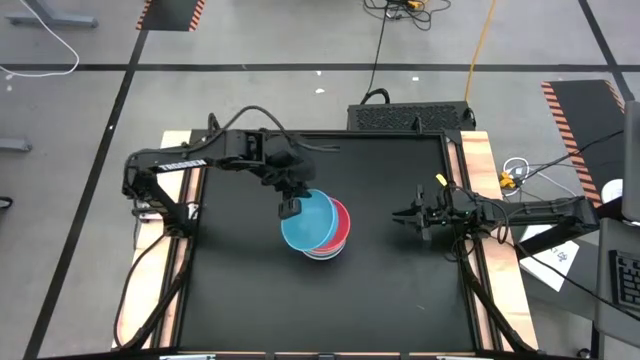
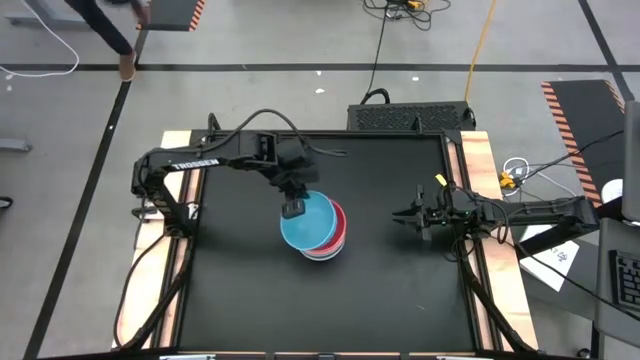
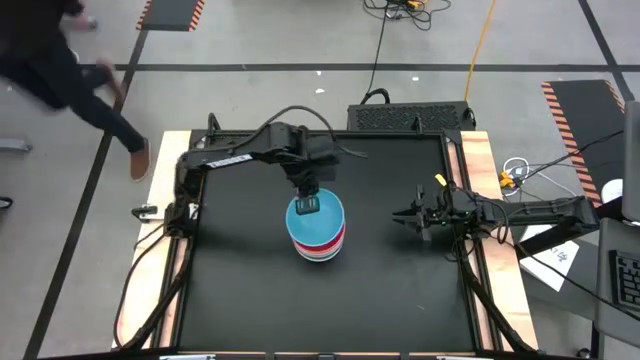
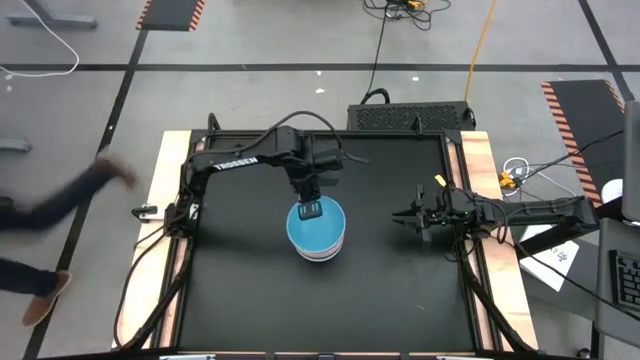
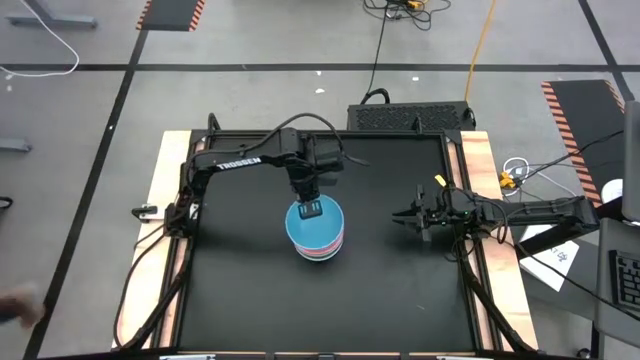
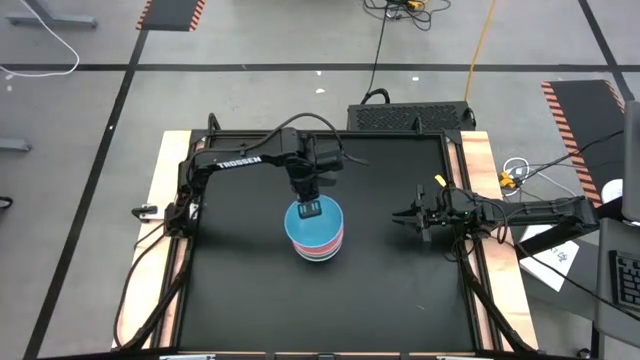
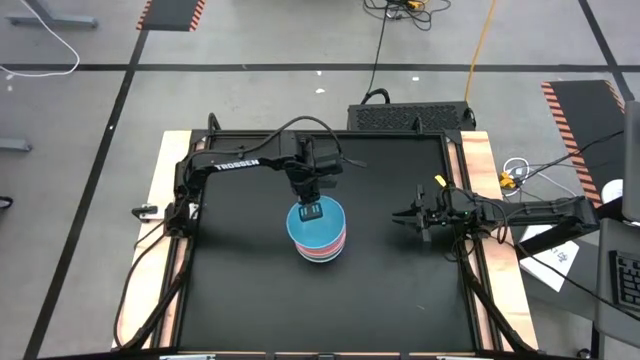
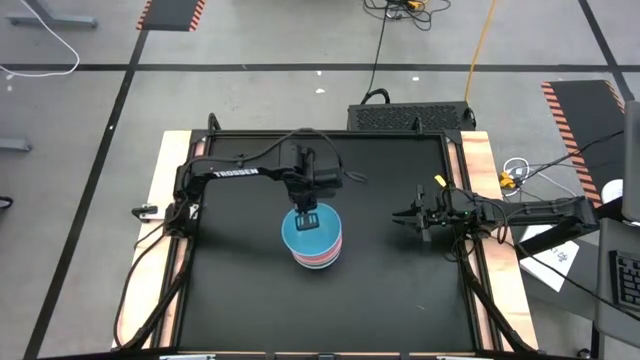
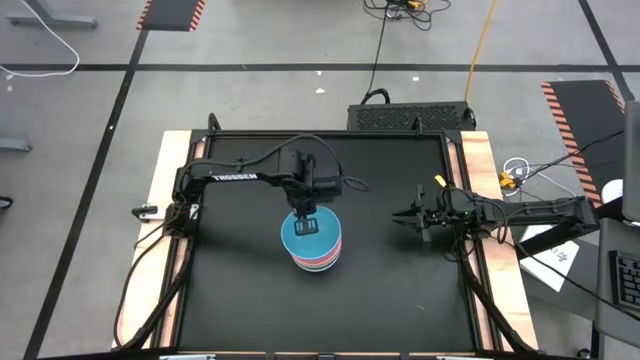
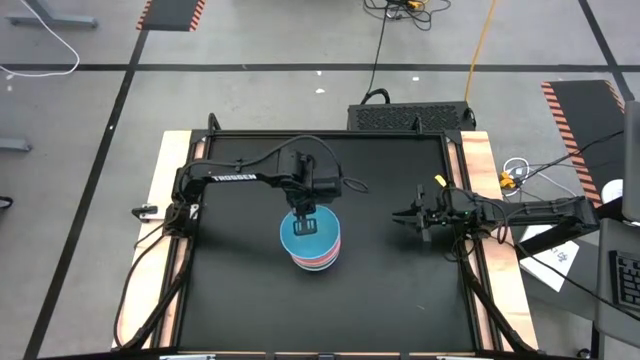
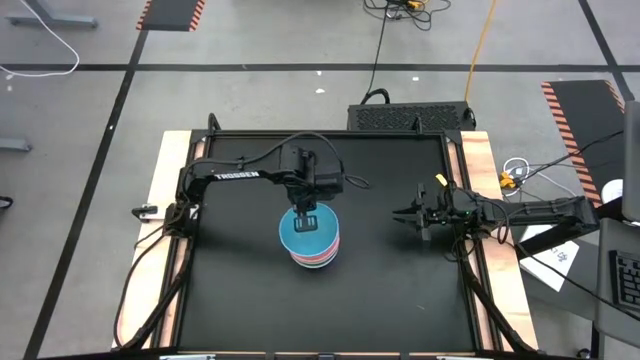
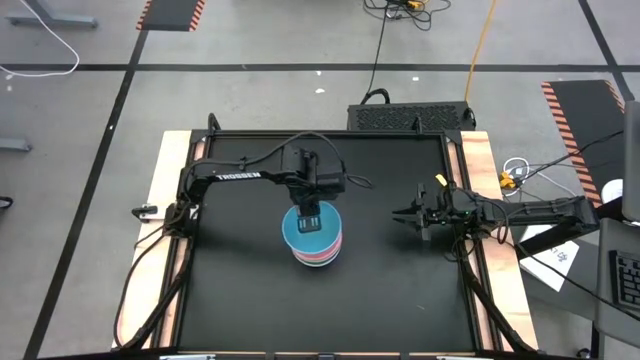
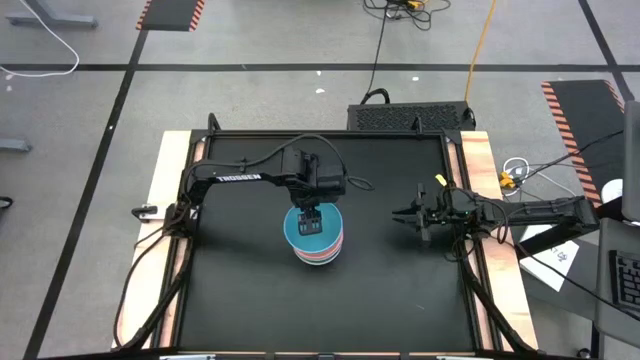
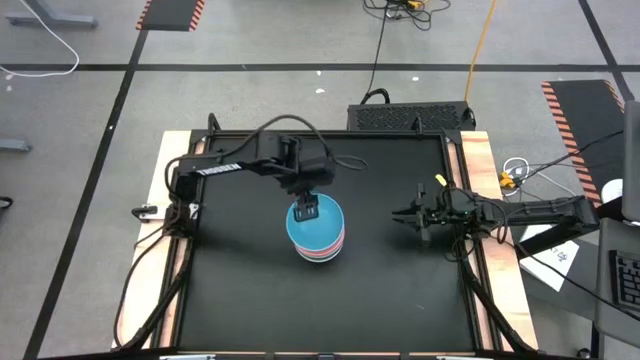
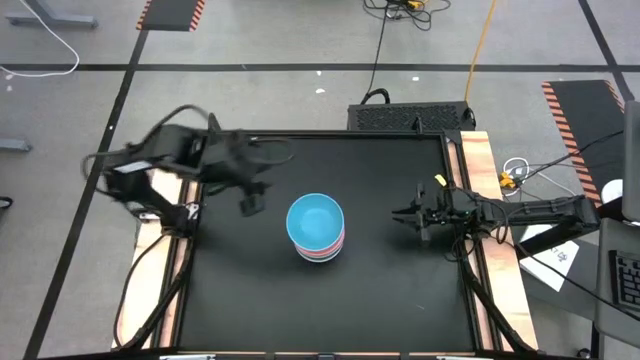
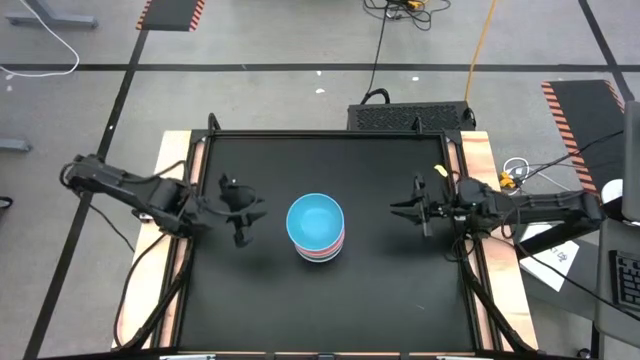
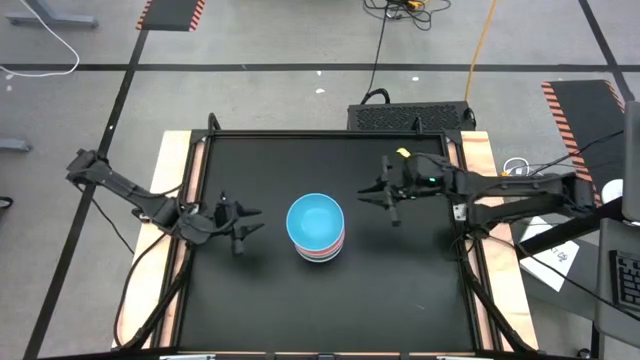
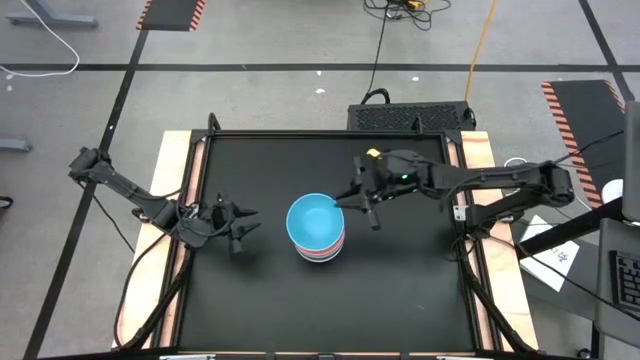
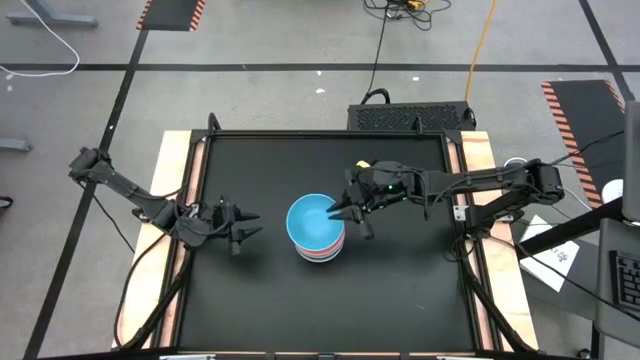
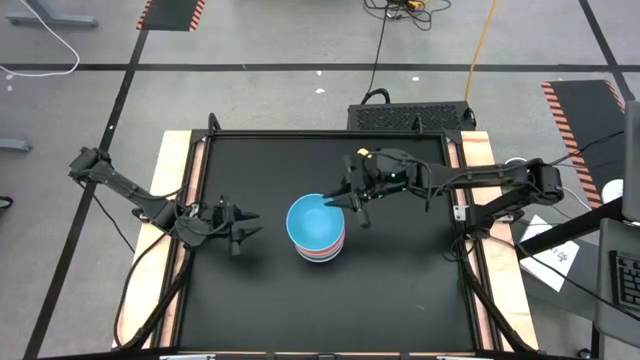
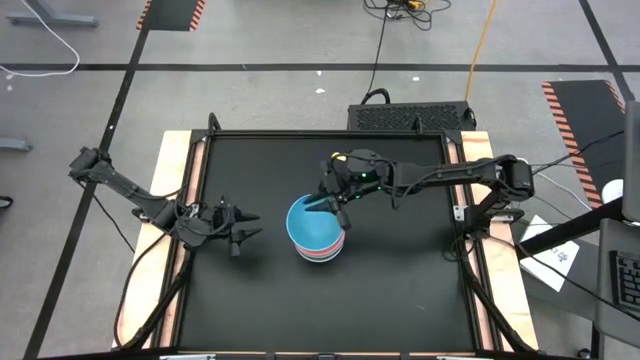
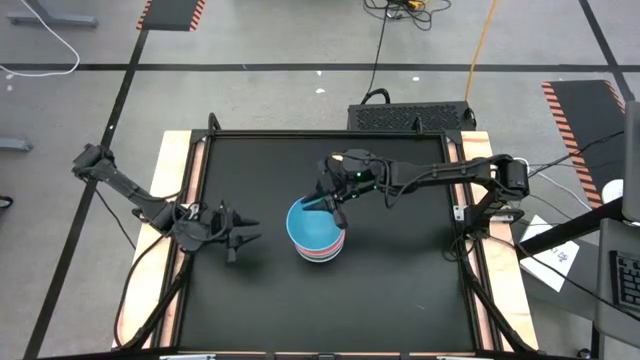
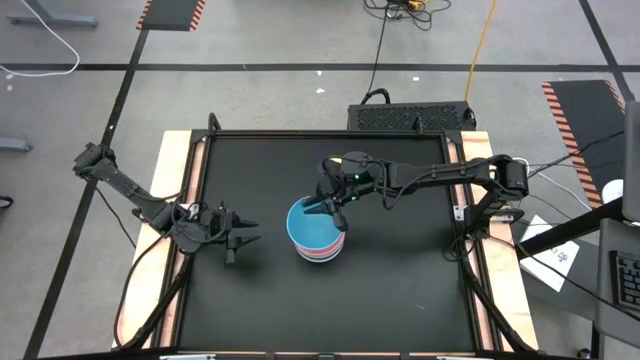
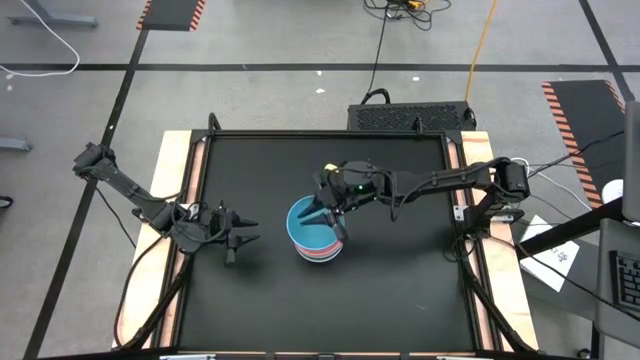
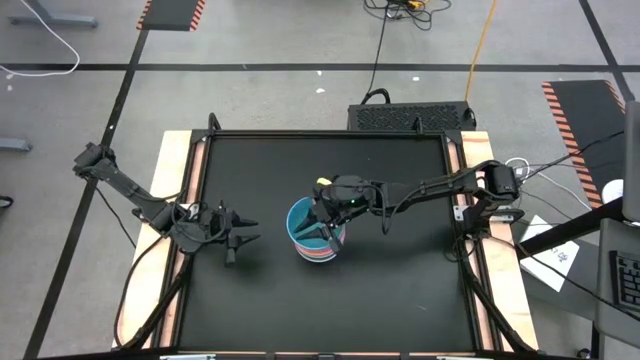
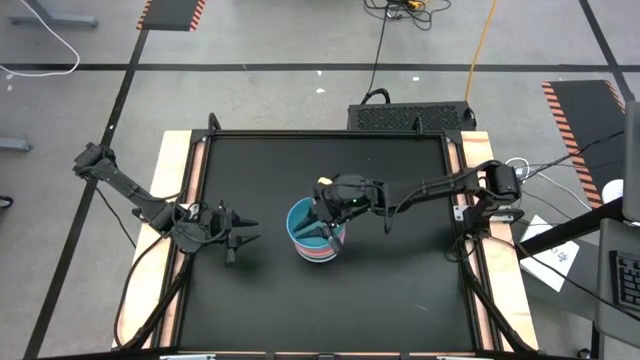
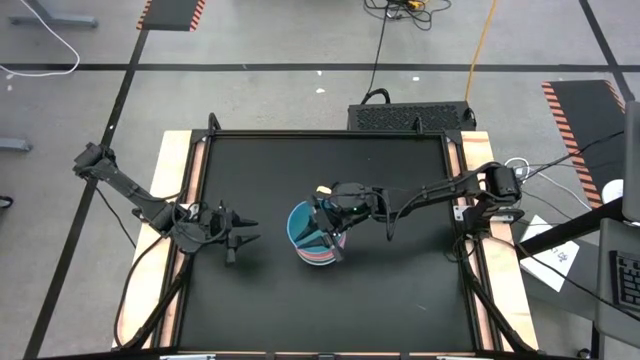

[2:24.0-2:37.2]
Task: Nest bowls inside each other
Stack the blue bowl on the red bowl

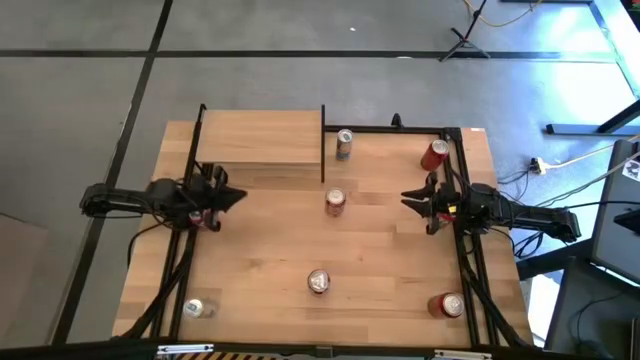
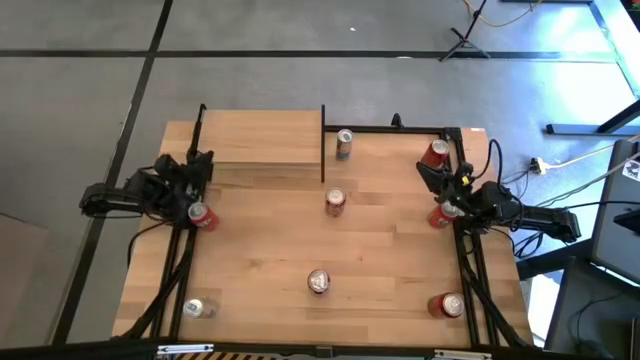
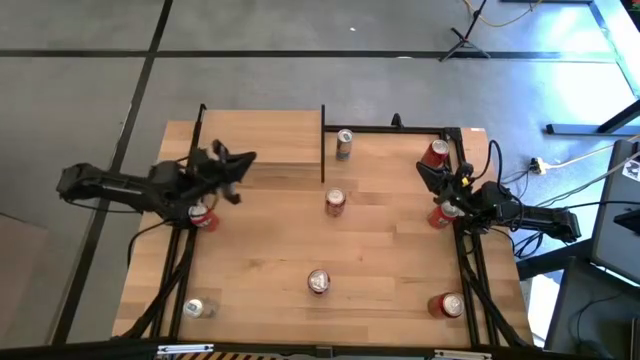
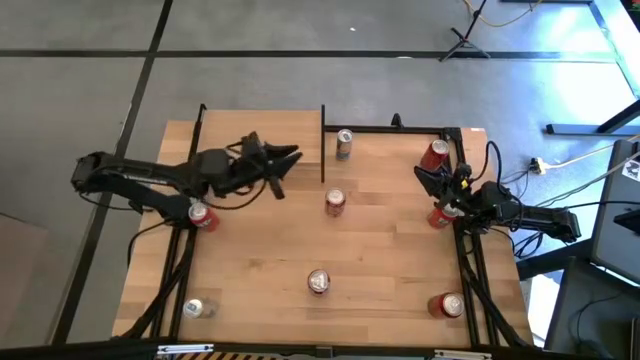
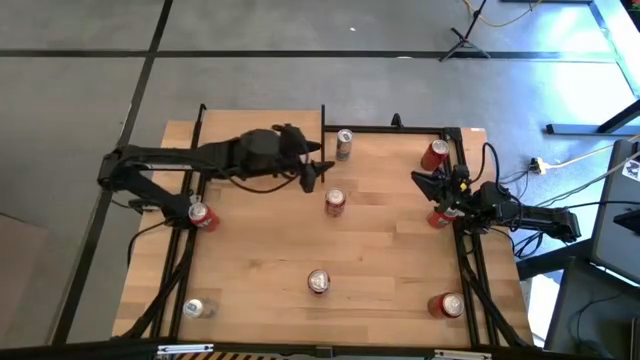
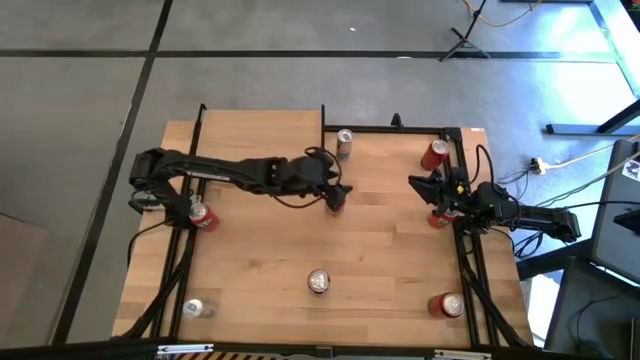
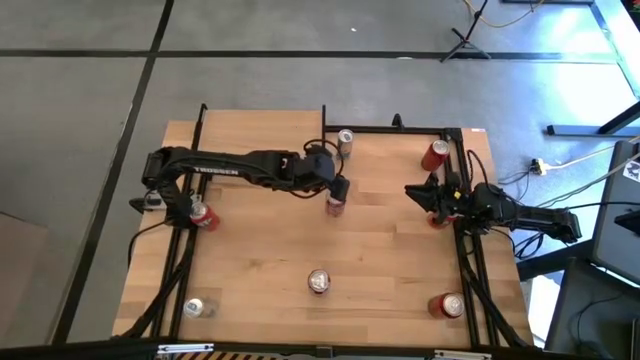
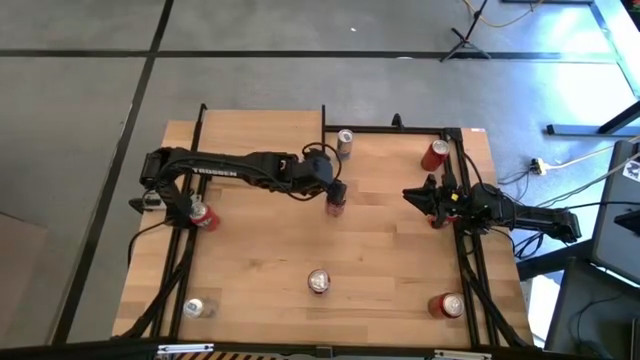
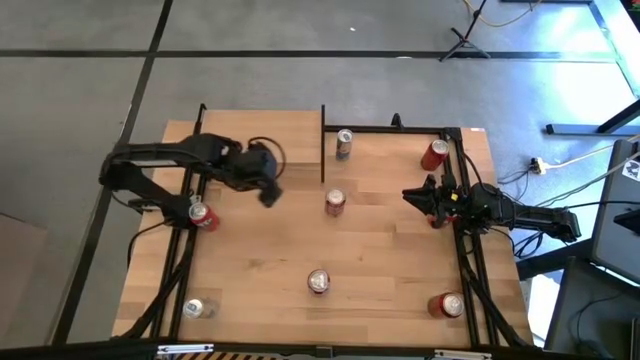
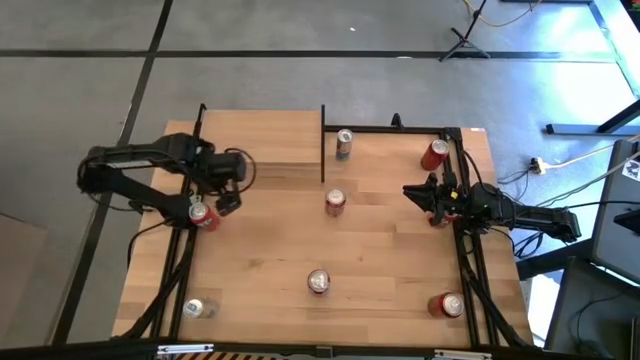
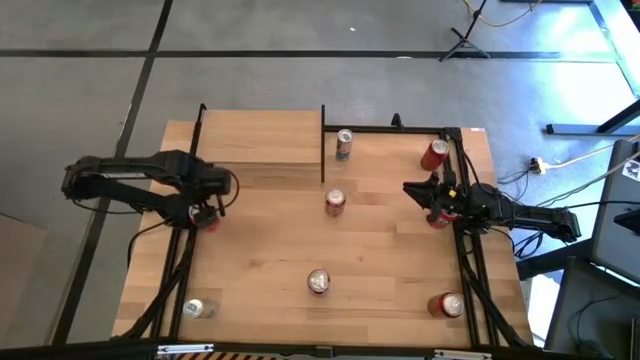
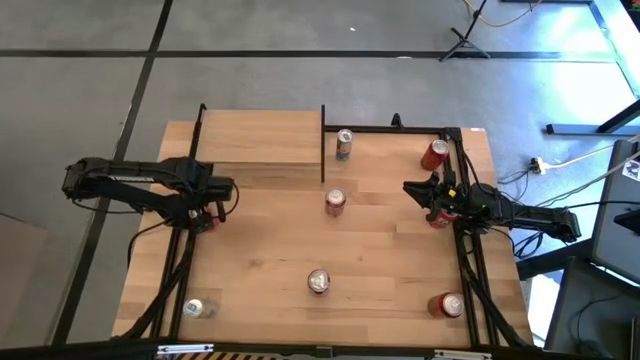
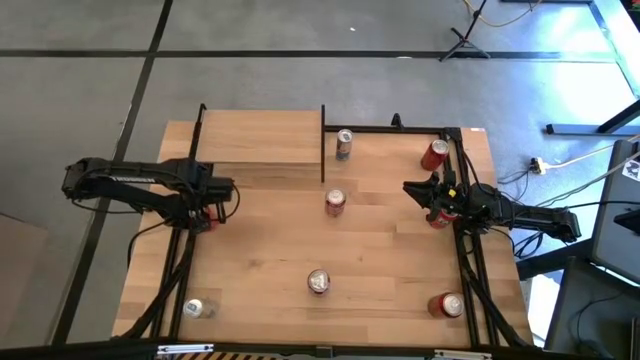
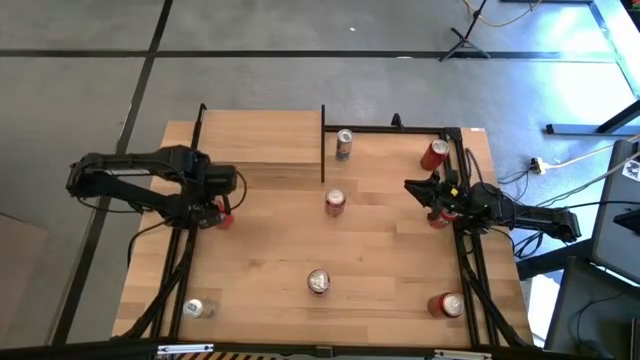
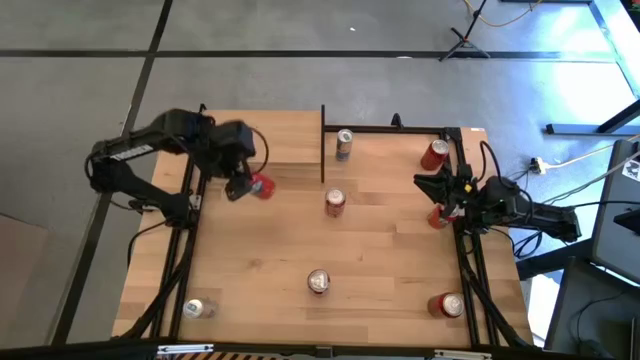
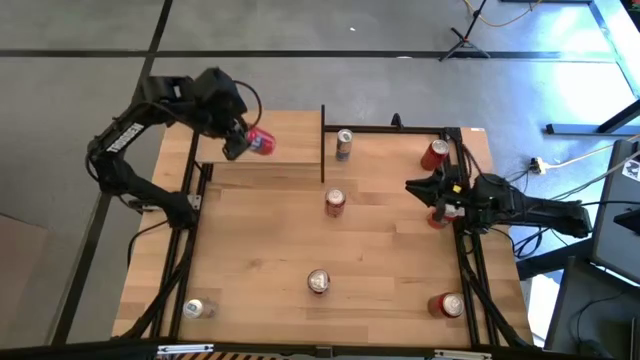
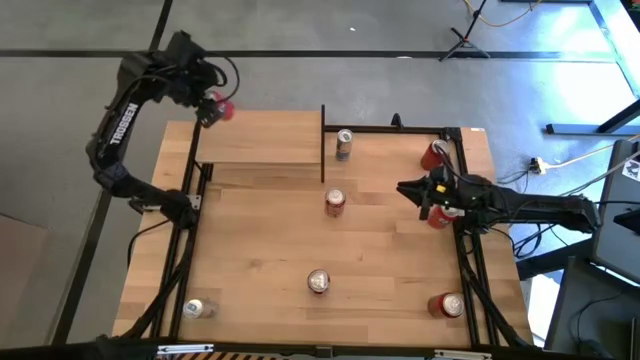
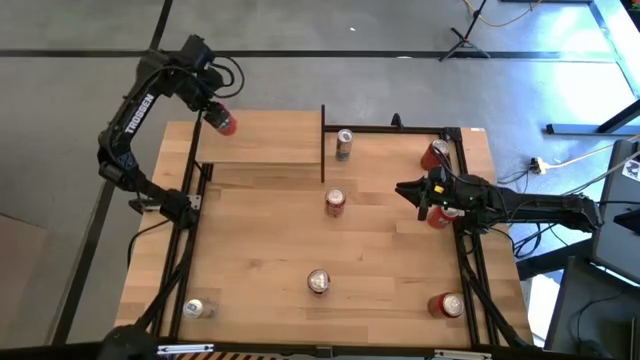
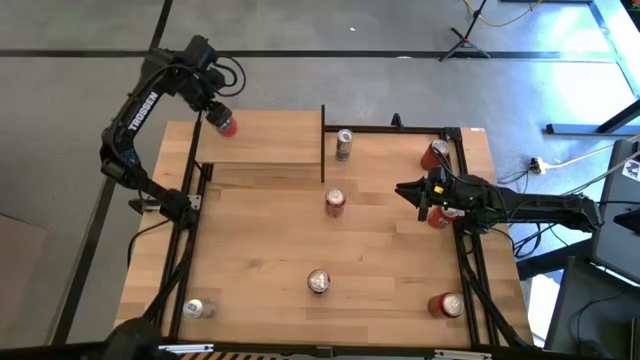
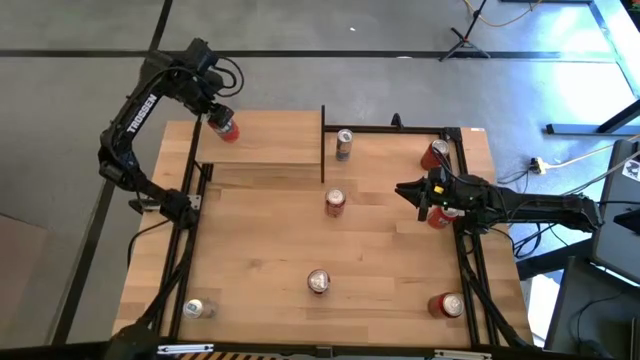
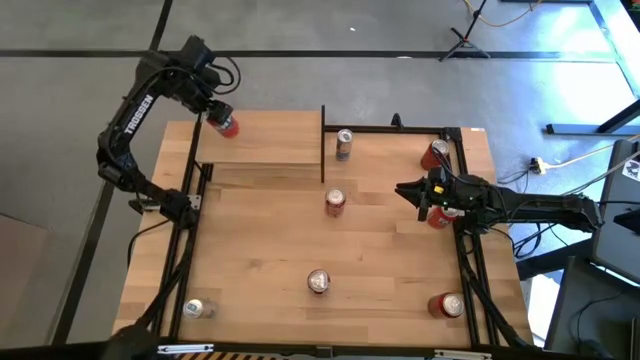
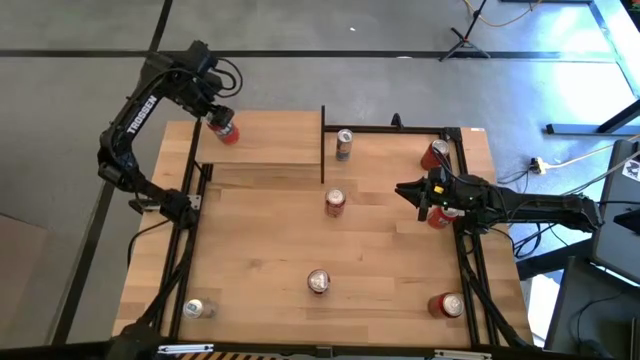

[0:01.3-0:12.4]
Task: Place canned beverage on shelf
Put the left orange soda can on the shelf
